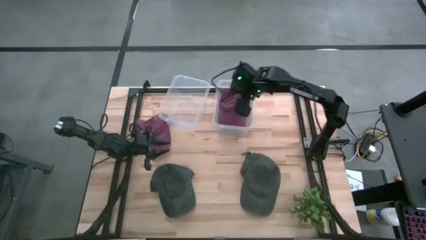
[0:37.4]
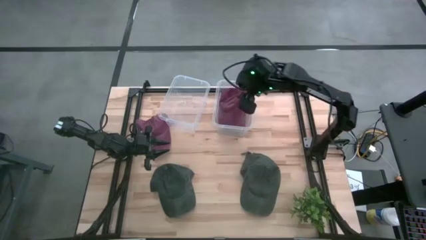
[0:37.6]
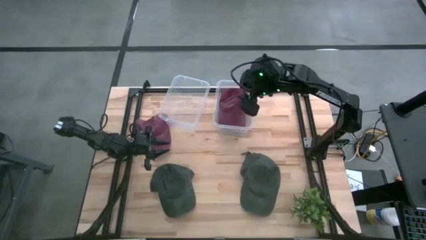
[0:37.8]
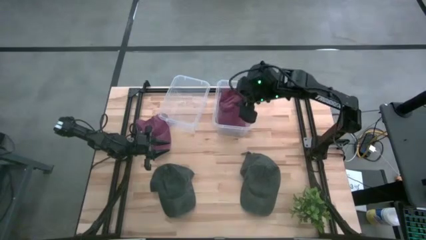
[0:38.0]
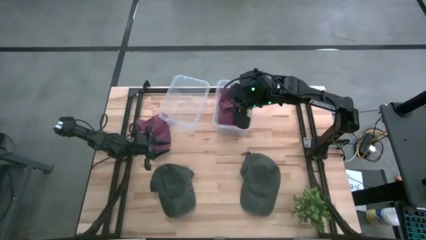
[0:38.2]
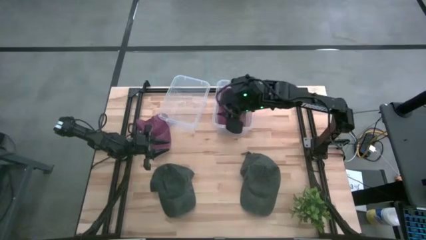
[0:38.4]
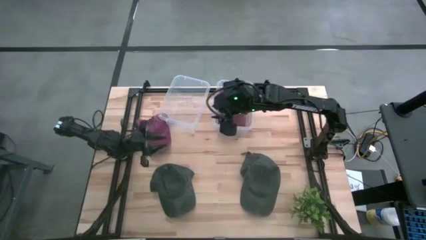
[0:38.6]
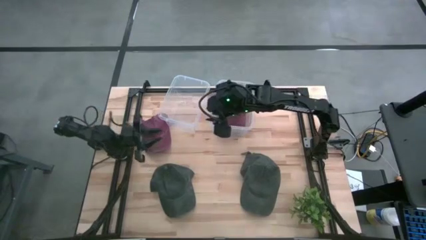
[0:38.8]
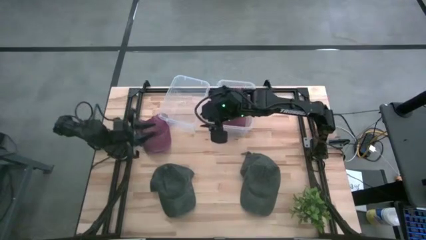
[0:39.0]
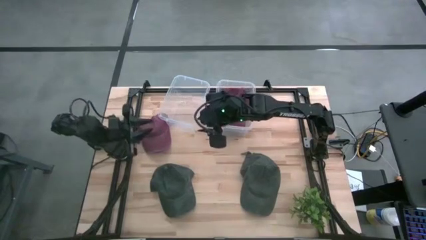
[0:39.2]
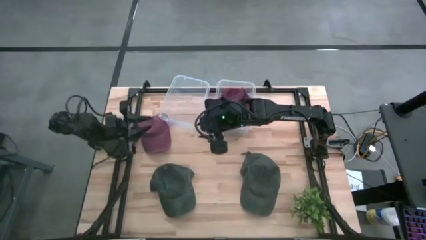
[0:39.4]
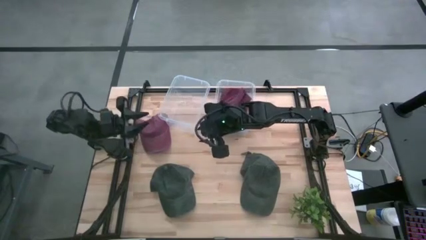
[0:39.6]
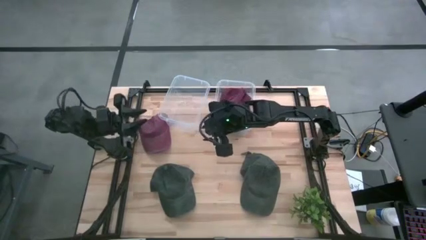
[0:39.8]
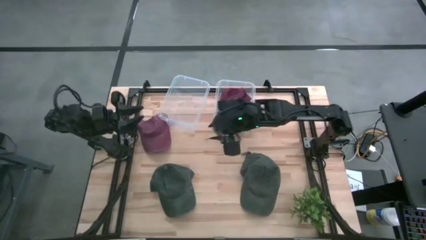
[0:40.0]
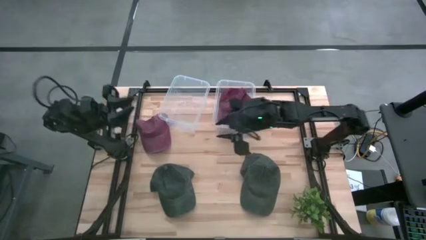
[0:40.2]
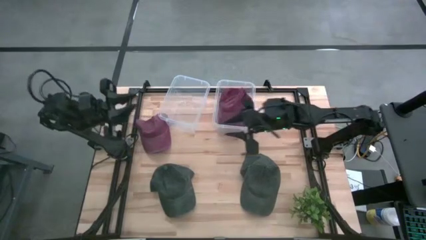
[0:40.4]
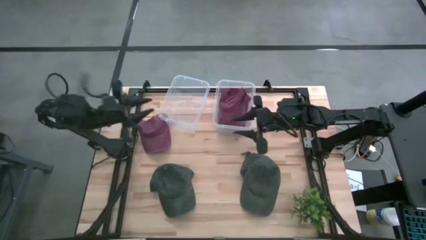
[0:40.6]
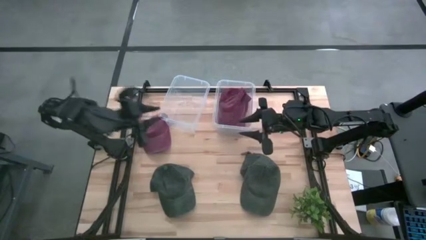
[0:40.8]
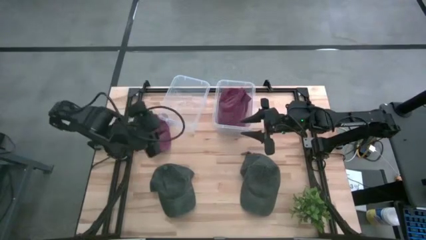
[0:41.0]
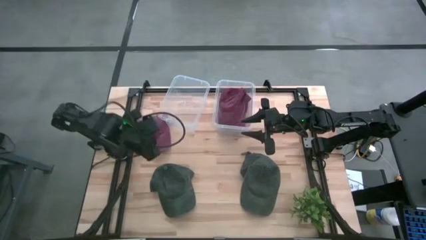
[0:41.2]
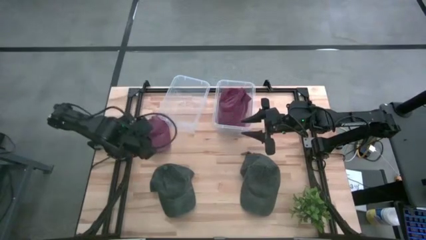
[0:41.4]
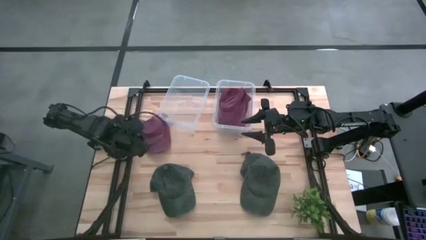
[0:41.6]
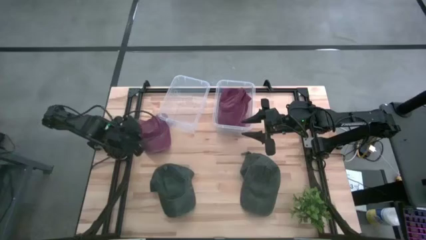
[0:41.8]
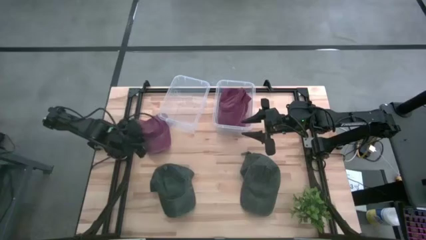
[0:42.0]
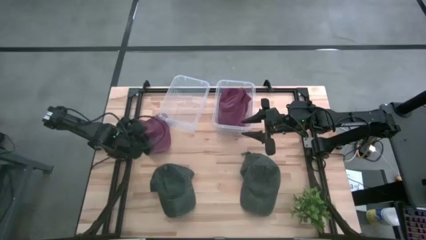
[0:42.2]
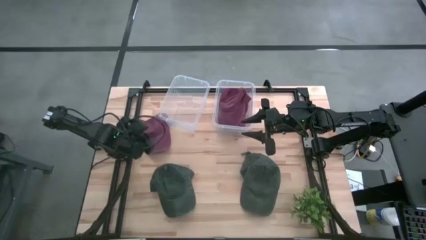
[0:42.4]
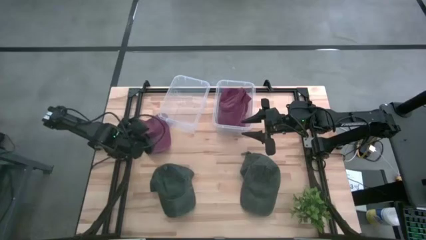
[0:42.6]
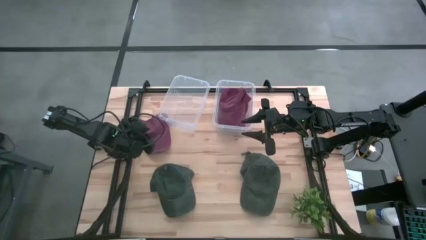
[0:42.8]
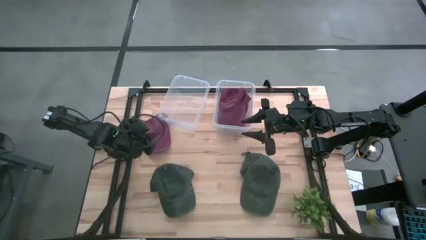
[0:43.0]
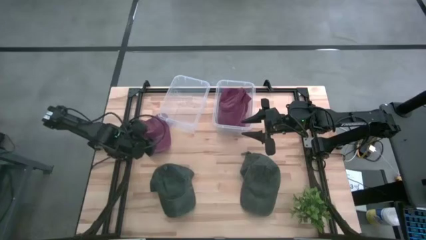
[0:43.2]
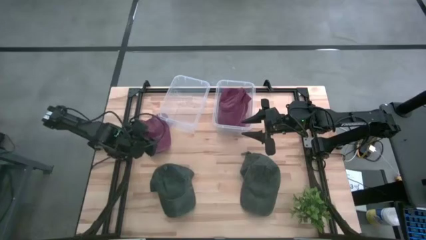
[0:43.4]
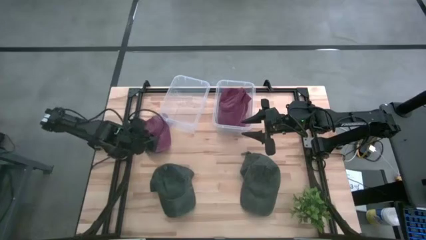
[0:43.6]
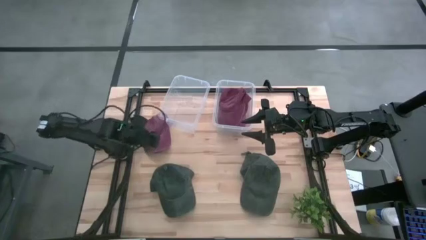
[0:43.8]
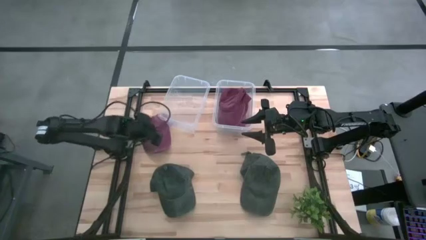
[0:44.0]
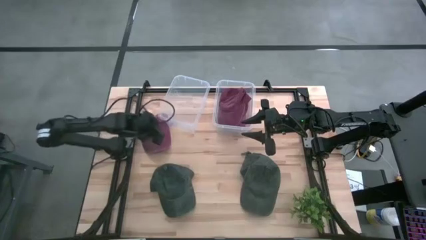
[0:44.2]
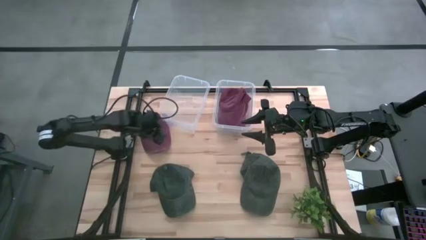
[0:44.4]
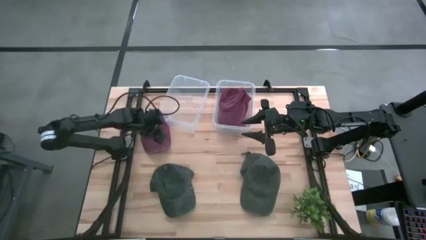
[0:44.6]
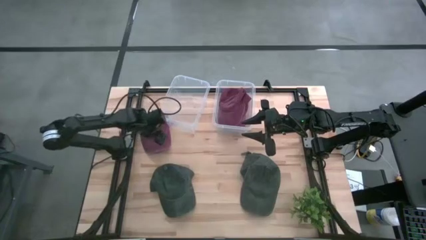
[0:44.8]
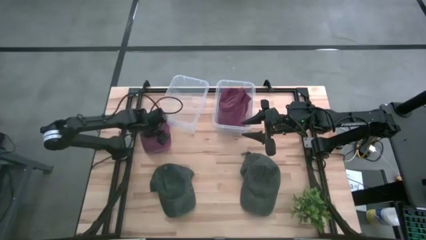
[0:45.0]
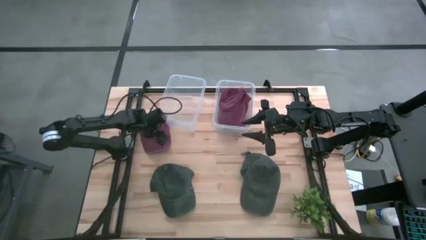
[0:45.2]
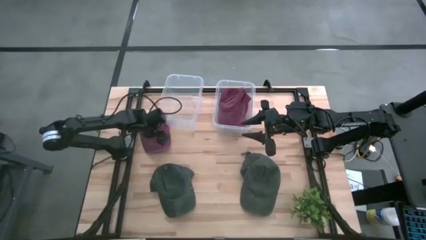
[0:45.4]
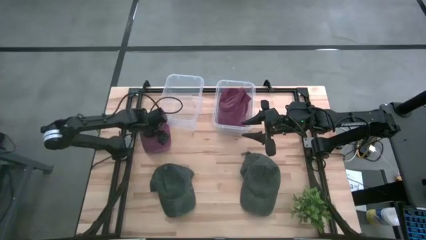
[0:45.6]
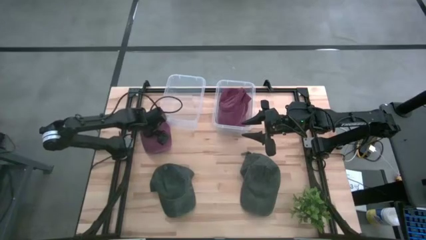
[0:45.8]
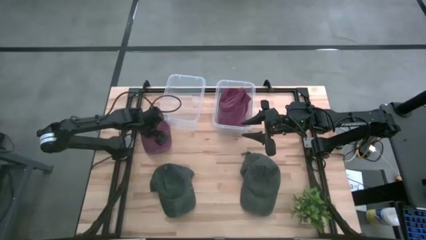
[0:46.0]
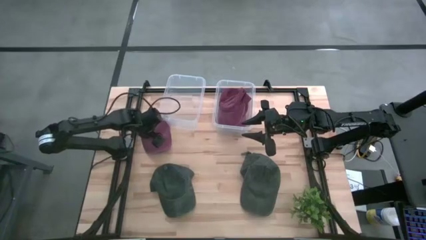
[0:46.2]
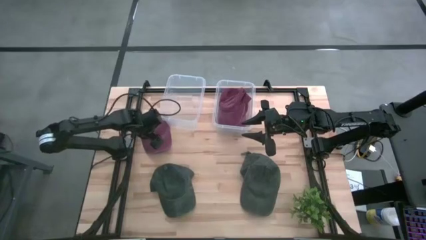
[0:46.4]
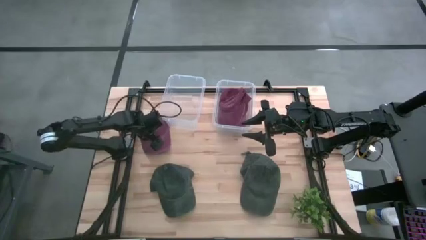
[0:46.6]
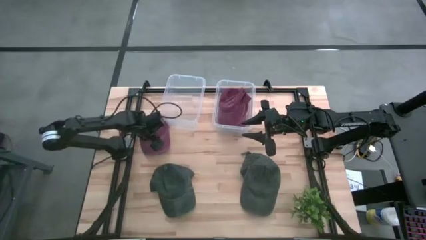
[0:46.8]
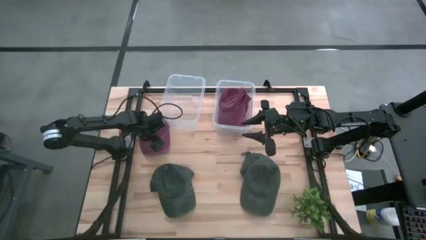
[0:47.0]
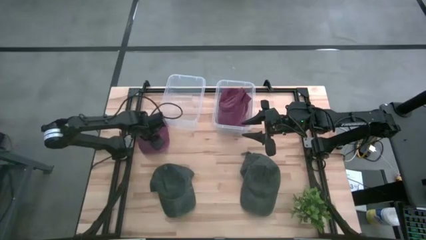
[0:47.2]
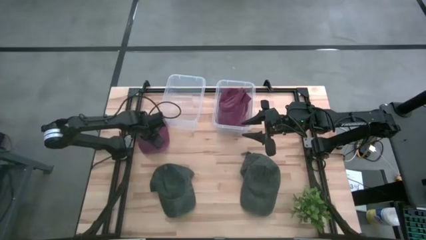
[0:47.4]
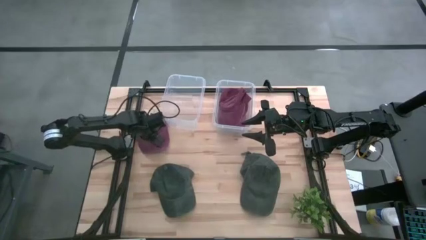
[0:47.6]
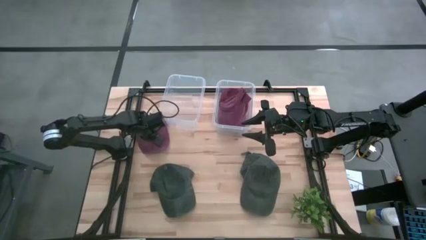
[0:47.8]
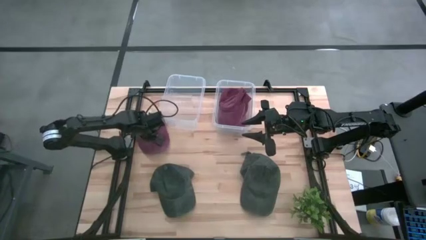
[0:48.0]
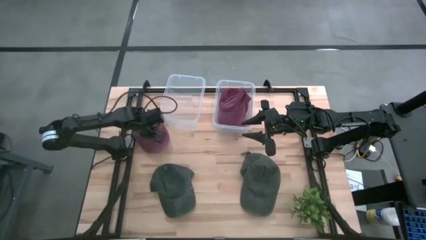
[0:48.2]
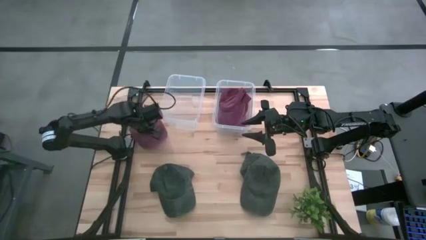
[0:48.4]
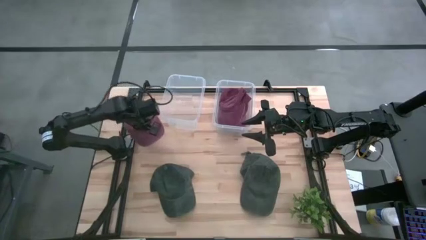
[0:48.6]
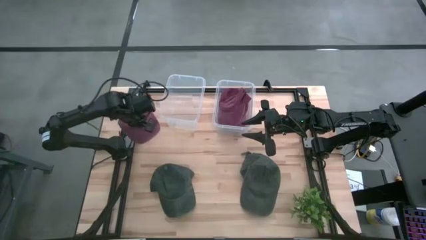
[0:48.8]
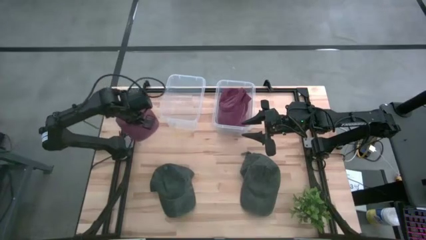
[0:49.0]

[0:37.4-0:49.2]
Task: Pick & Place hat
Put the red cap into the right transparent bin

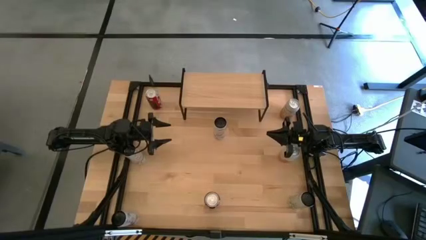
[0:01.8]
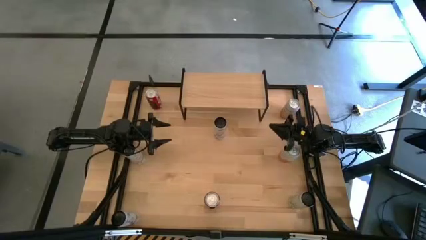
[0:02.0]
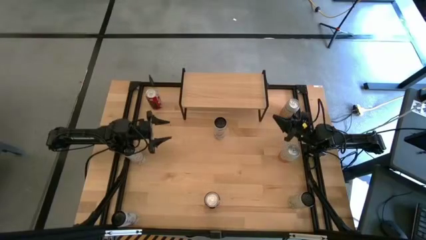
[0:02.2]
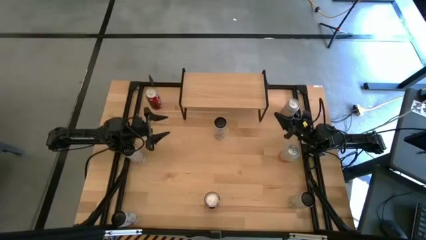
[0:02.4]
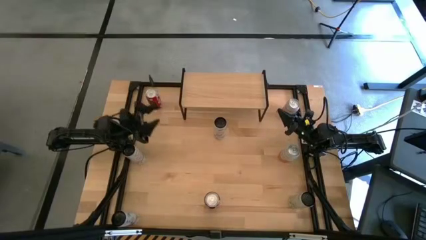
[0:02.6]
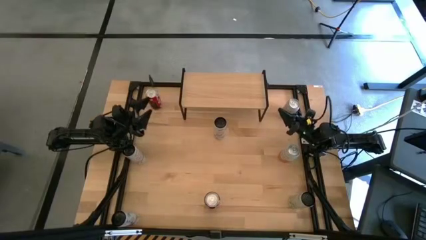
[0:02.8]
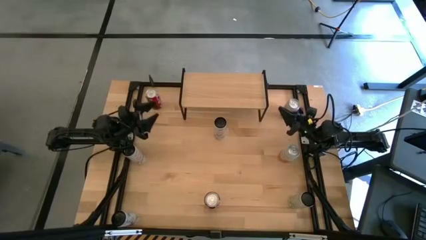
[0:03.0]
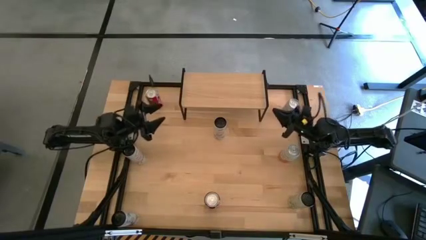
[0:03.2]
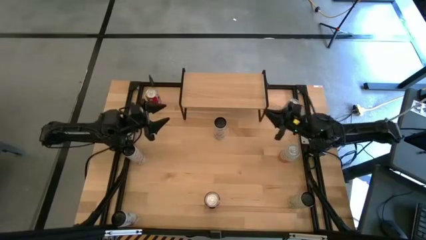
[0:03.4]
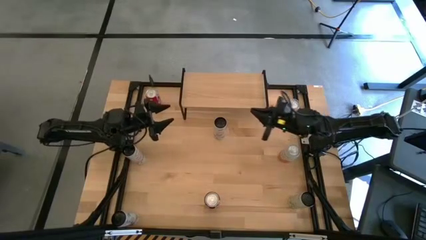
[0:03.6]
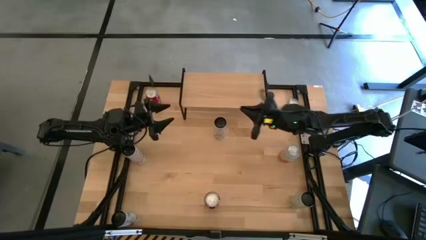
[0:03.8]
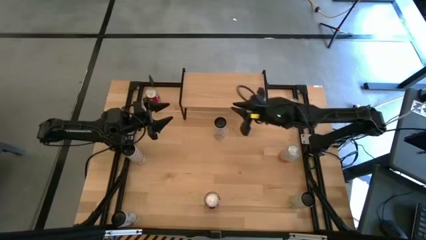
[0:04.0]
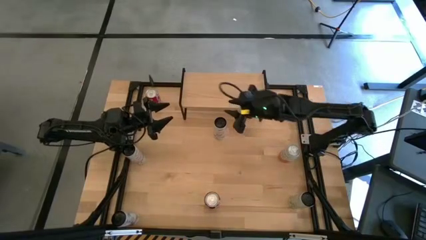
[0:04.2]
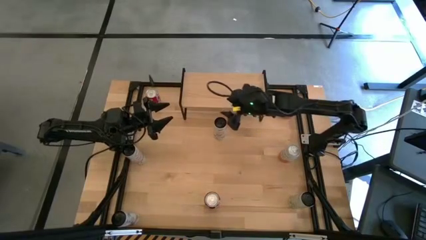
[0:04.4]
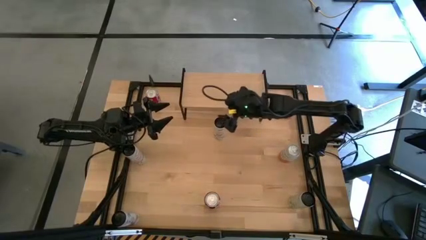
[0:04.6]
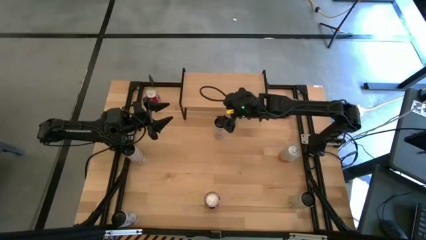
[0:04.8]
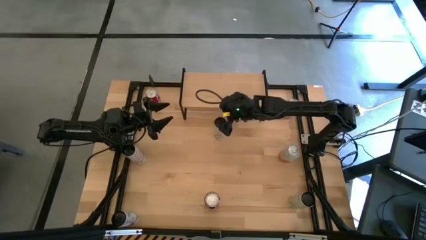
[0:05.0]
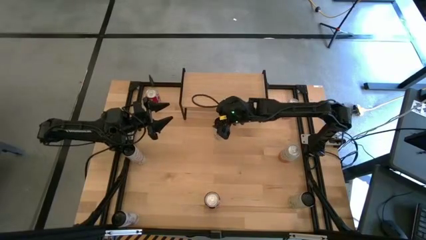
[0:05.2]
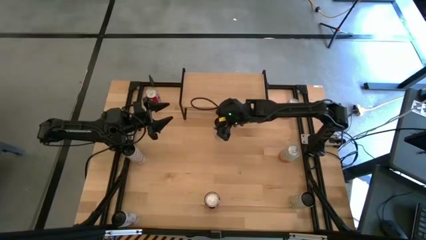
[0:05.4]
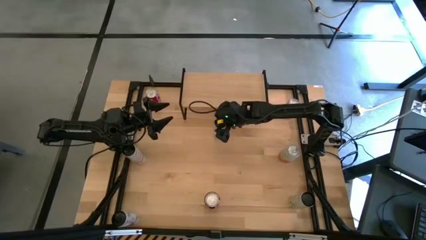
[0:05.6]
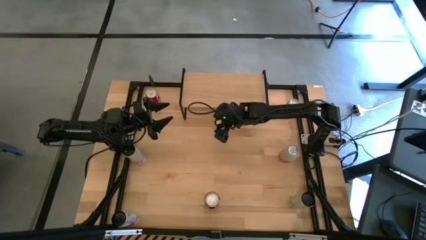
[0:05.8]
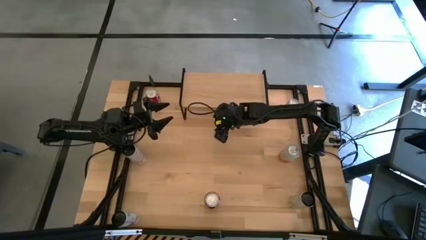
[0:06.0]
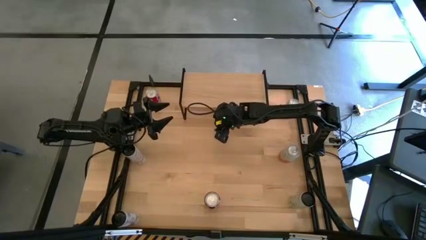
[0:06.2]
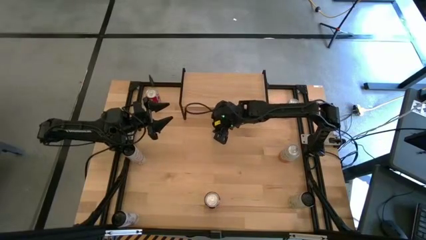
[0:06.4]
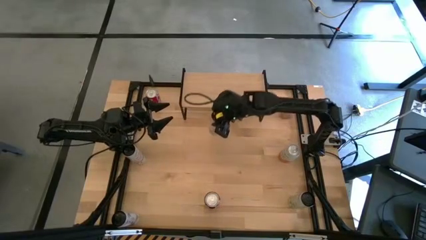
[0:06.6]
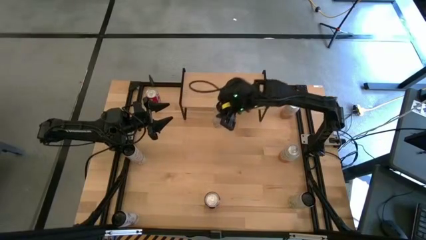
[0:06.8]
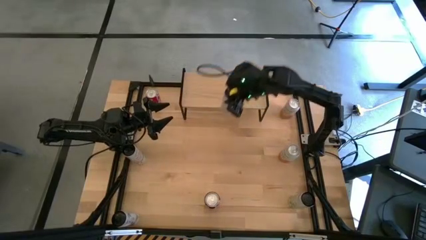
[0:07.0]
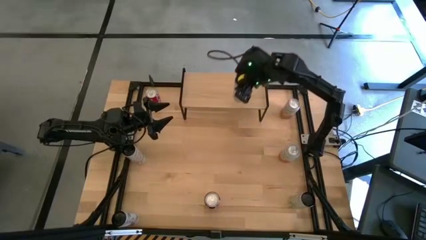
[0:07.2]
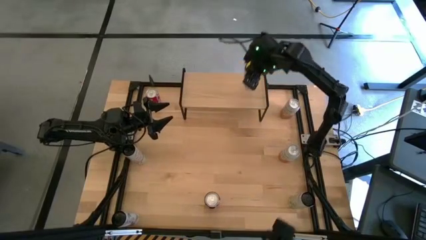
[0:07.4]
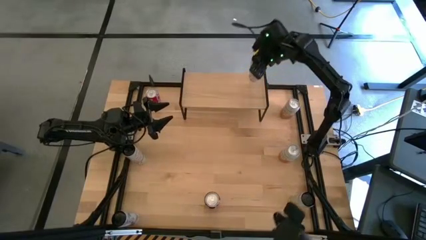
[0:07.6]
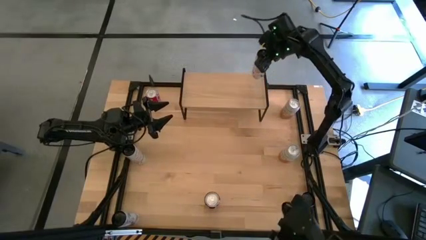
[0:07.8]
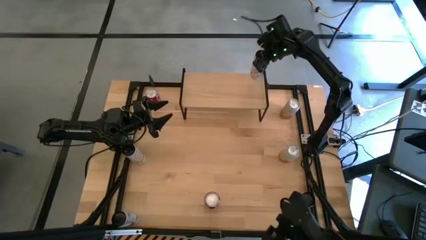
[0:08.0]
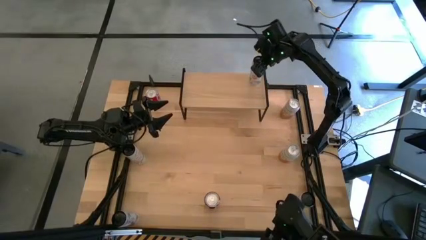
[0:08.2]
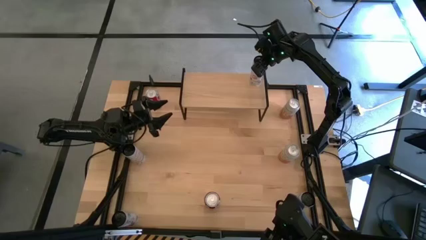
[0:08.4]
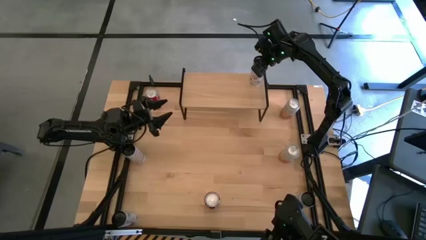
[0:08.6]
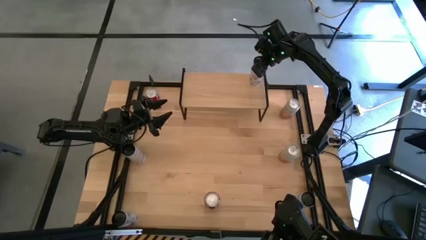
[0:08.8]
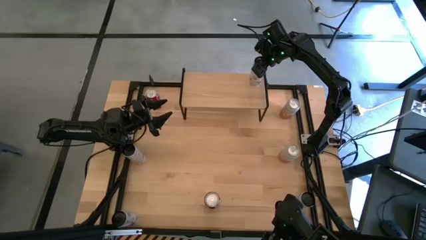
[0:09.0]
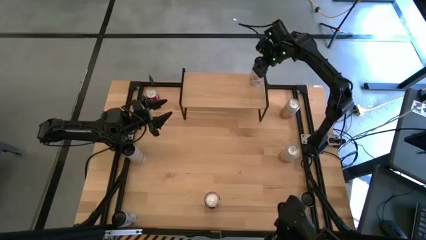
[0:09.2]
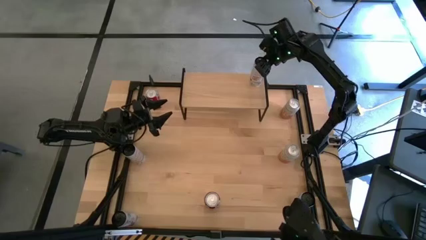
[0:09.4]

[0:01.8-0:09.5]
Task: Place canned beverage on shelf
Put the top white-pink soda can on the shelf
